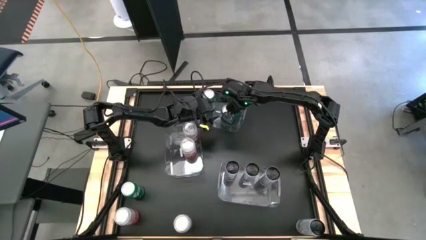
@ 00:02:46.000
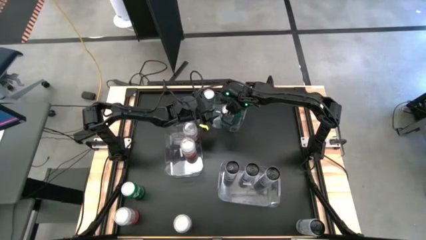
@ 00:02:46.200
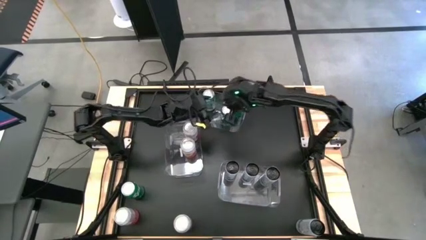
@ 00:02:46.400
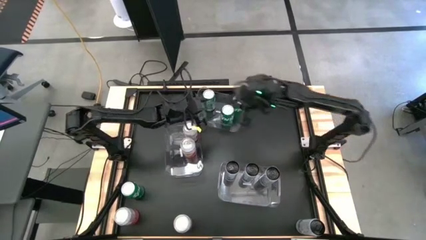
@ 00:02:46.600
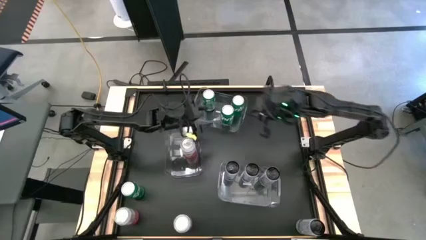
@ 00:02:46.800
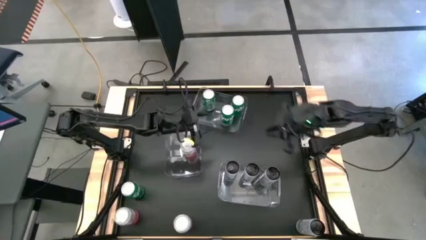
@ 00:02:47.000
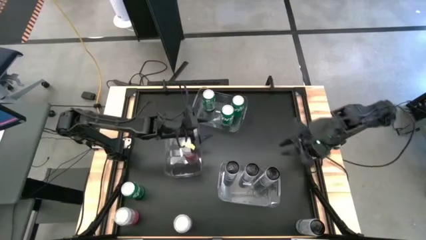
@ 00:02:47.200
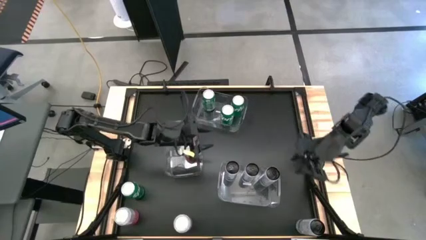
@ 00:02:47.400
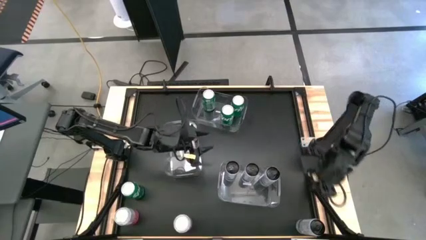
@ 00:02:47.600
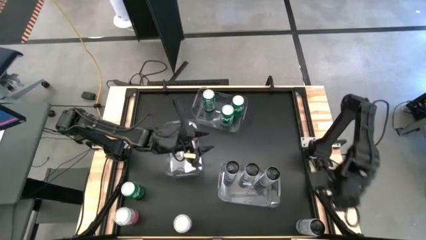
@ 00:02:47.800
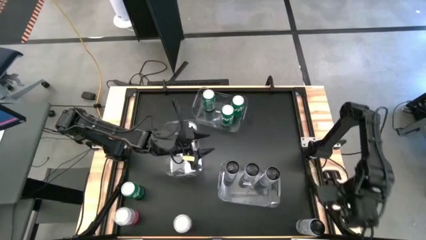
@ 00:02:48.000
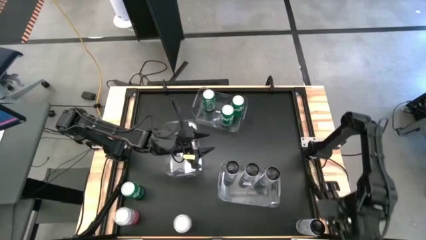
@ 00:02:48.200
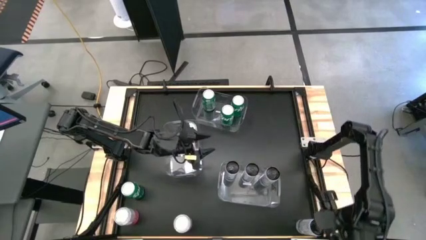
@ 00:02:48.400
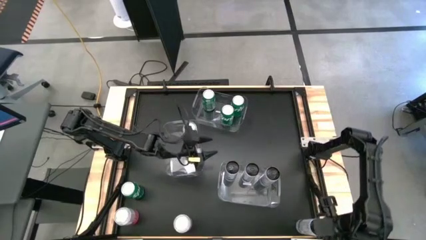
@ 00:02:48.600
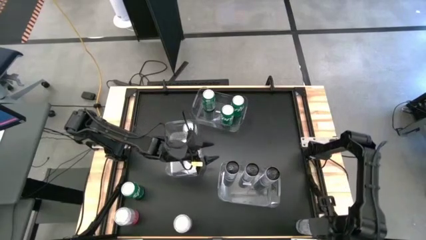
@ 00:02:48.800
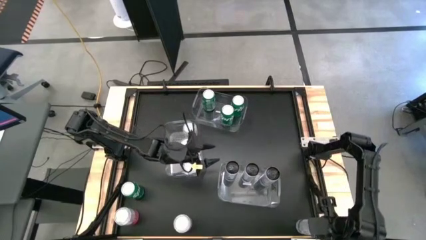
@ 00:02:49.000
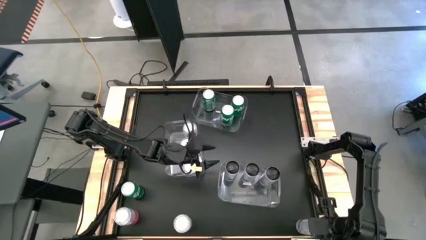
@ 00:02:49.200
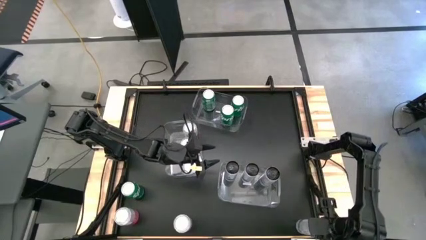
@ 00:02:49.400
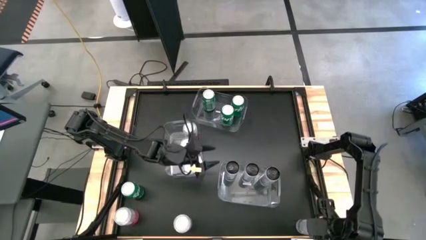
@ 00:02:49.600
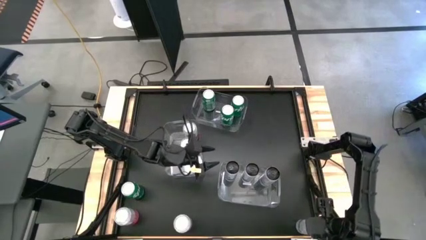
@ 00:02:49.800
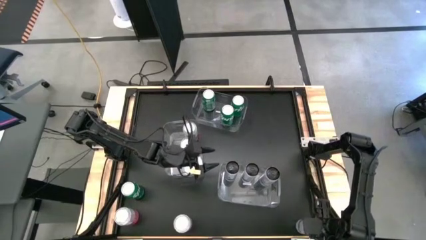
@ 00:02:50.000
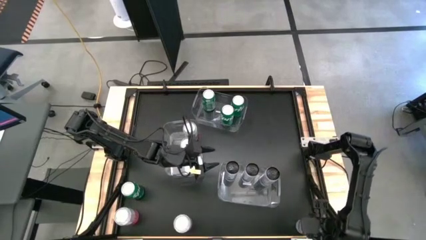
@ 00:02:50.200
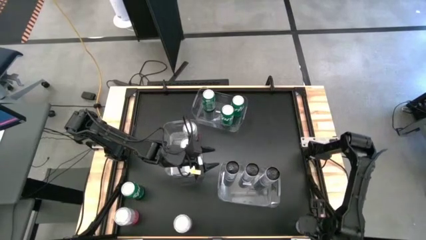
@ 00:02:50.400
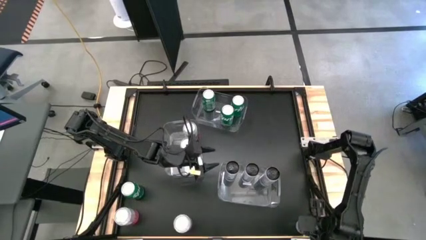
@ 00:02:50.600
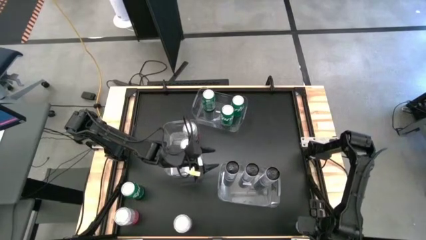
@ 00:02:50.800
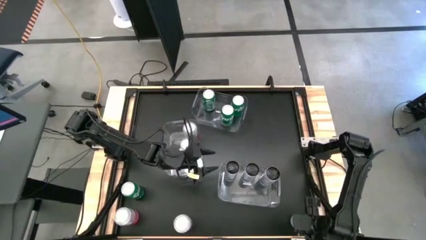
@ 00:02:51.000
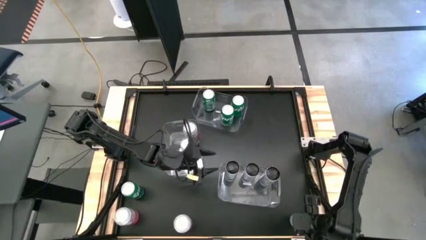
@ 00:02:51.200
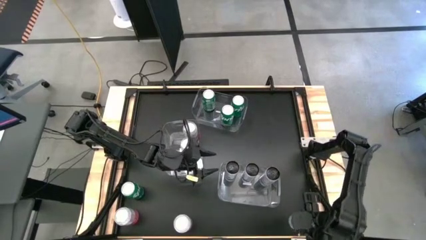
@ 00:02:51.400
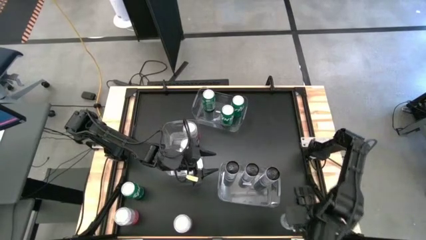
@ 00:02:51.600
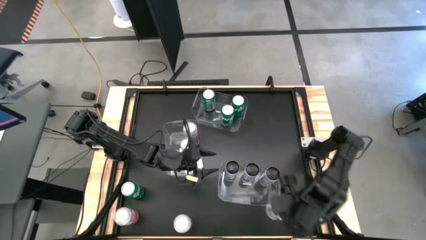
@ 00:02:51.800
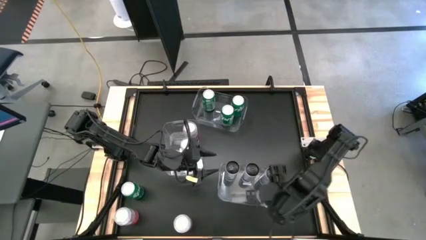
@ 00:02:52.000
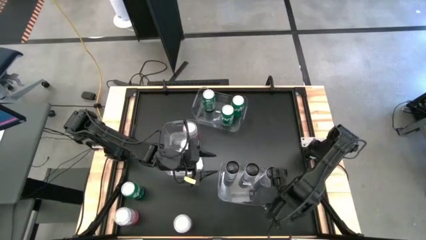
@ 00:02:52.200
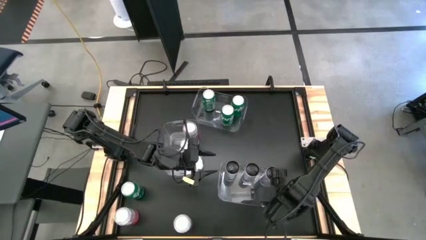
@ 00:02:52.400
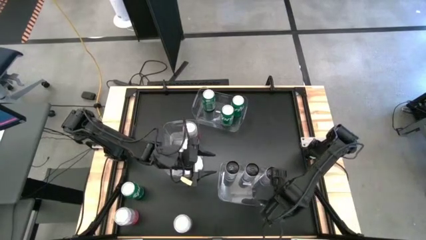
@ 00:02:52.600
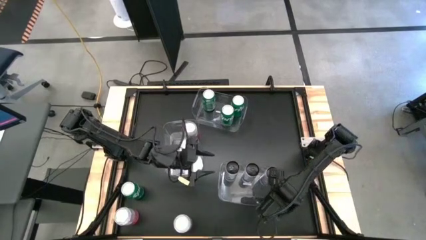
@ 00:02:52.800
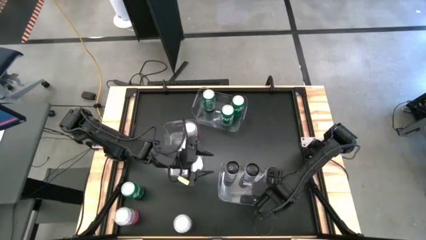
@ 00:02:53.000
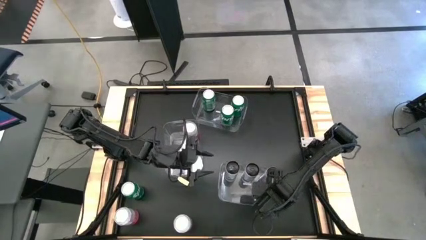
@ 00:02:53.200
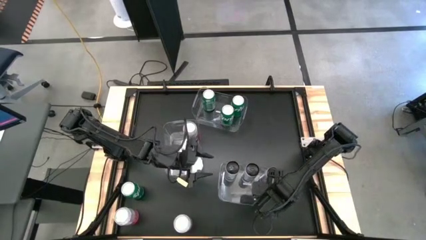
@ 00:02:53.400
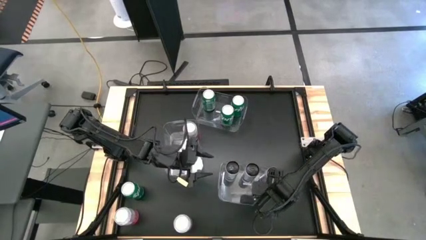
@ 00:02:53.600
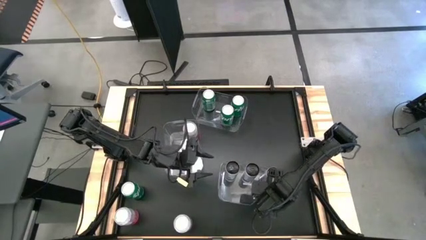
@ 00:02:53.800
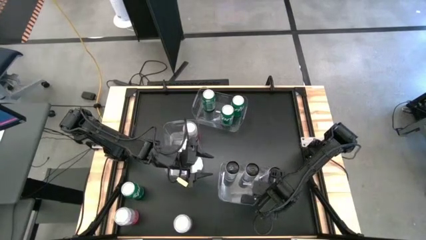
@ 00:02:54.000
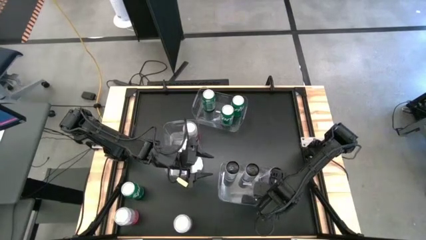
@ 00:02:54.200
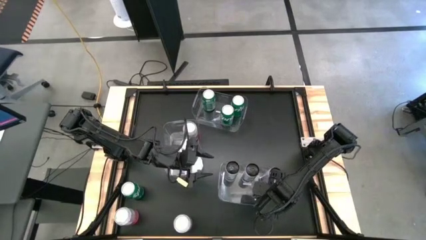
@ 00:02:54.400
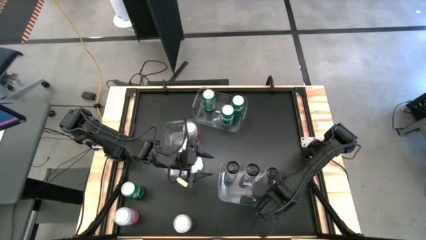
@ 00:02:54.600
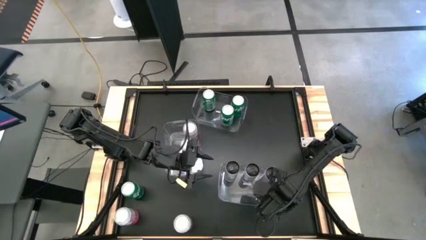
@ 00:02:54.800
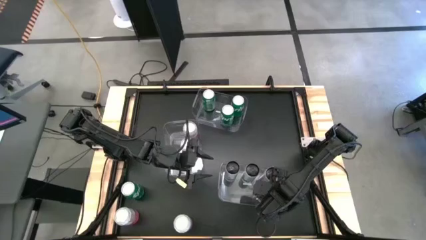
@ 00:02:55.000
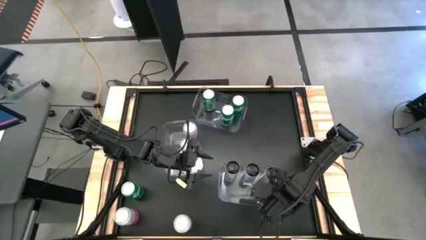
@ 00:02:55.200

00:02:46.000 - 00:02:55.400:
Task: Sort soda cans
Put the white soda can into the bottom transparent bin

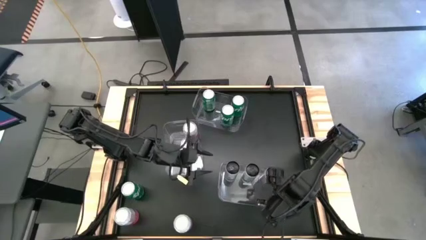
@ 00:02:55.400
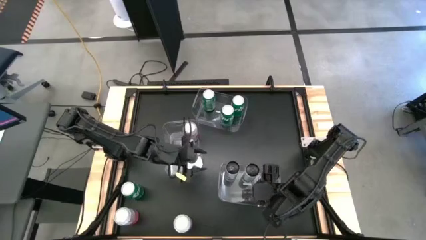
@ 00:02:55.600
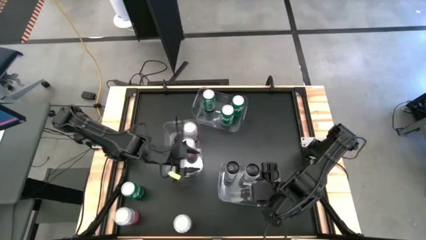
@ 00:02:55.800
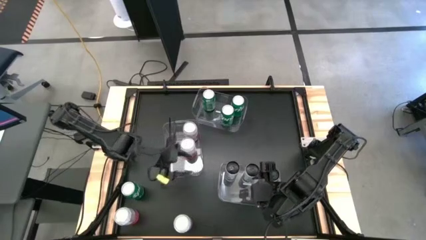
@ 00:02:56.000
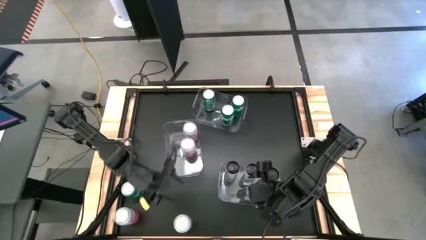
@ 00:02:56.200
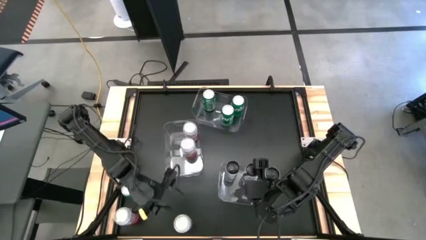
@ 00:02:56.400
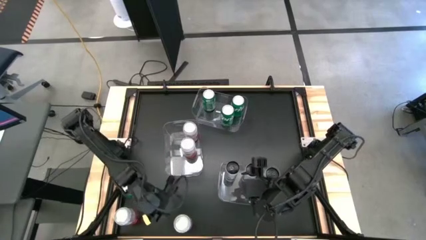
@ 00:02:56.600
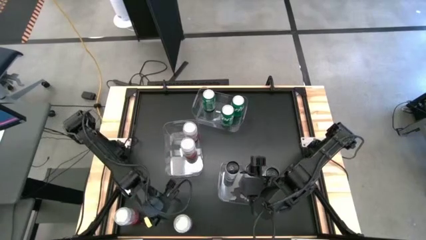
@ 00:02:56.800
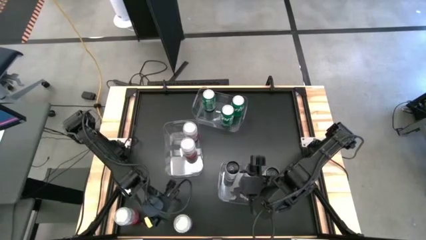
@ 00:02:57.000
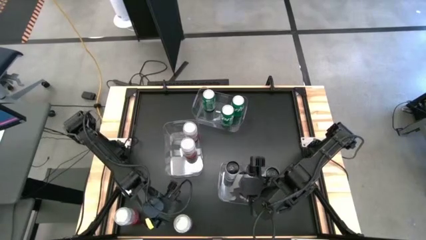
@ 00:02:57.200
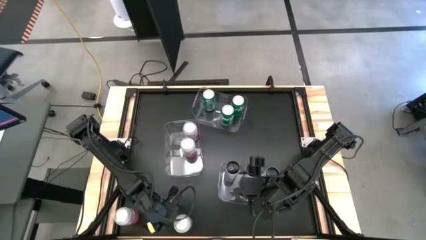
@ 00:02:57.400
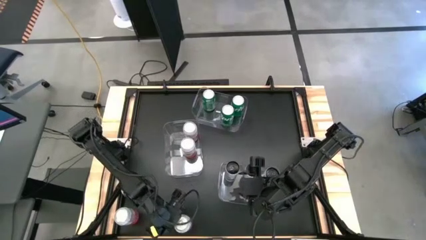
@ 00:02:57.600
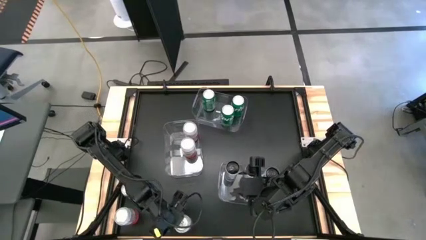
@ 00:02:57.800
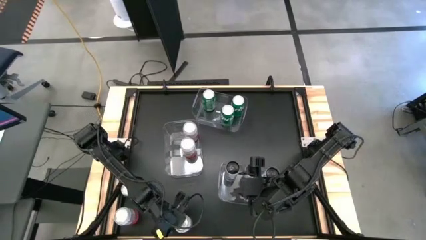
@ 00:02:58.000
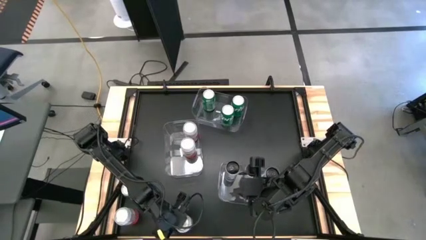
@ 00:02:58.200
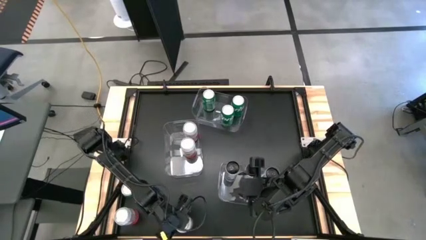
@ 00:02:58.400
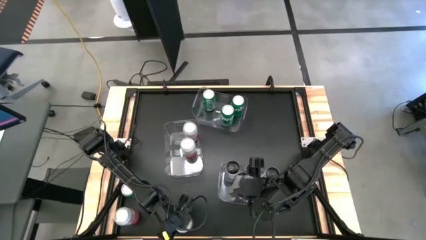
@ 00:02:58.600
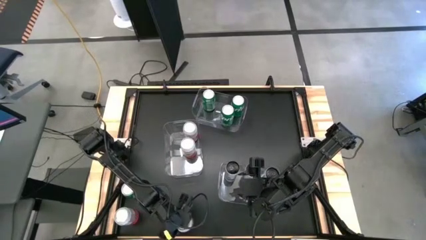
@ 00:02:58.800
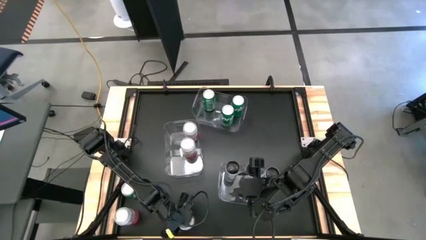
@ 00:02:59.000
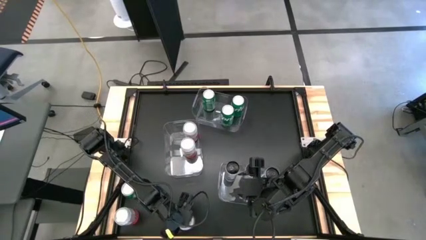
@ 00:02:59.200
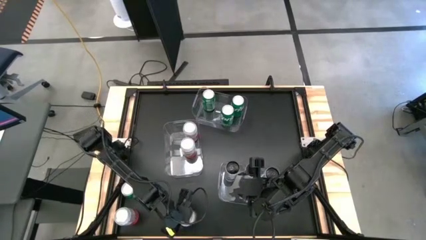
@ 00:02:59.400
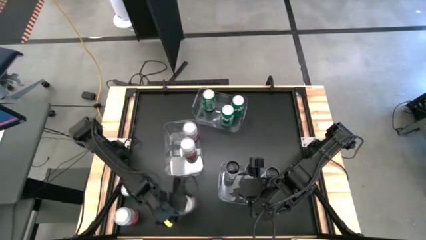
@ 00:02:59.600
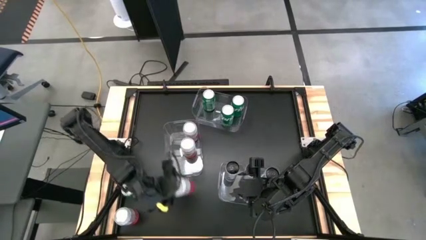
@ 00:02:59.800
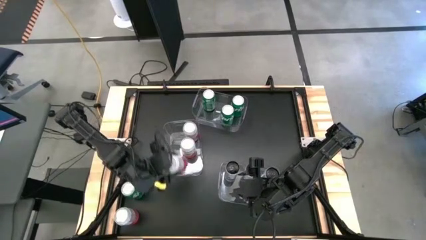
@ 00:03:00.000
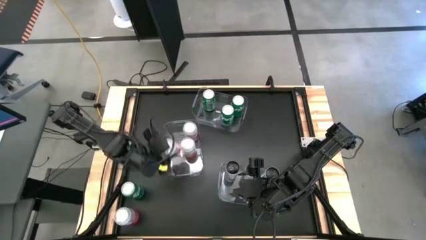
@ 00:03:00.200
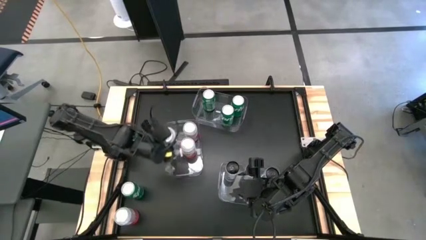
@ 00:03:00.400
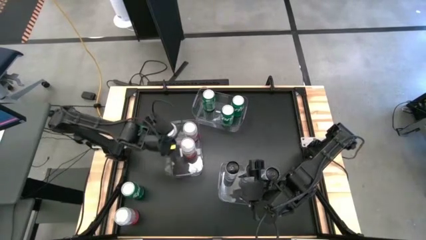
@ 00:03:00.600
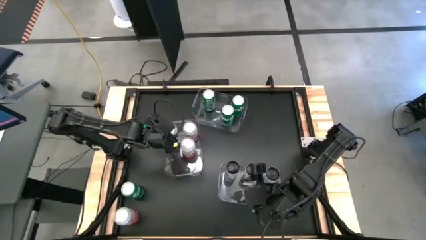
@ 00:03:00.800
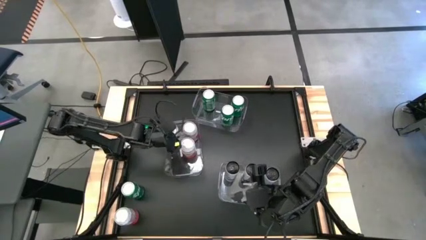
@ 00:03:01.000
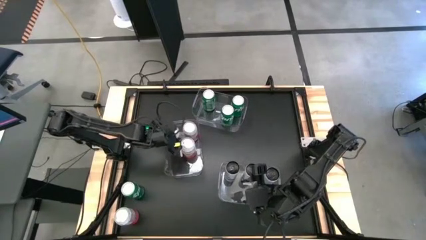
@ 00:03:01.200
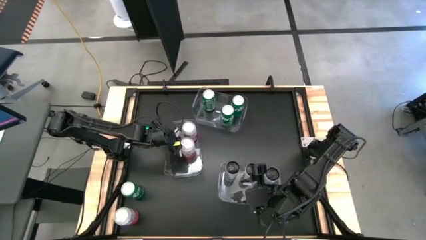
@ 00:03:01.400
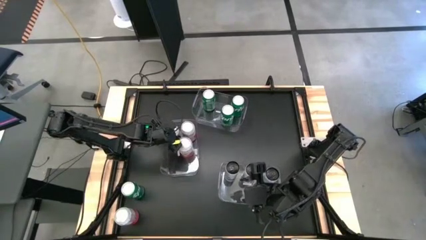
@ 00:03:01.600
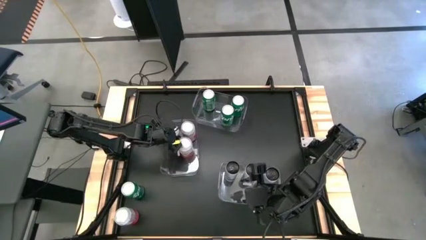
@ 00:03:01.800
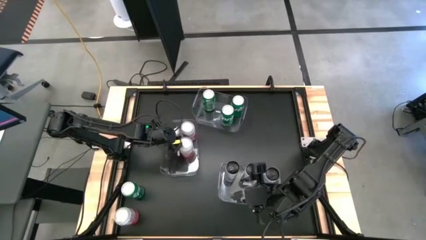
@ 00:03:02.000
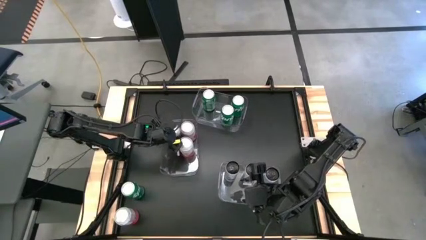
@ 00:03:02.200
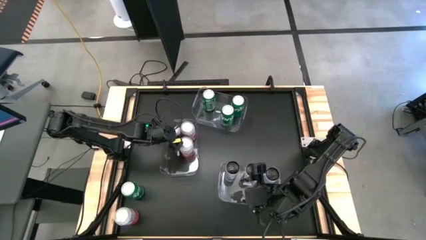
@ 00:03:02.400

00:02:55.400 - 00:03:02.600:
Put the pink soda can into the center transparent bin
